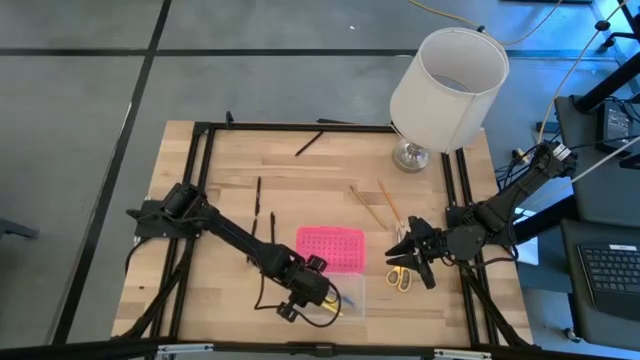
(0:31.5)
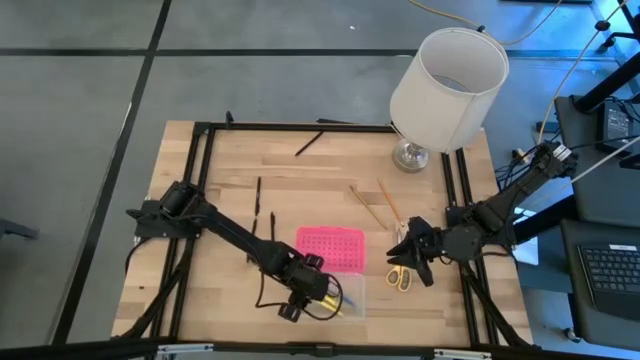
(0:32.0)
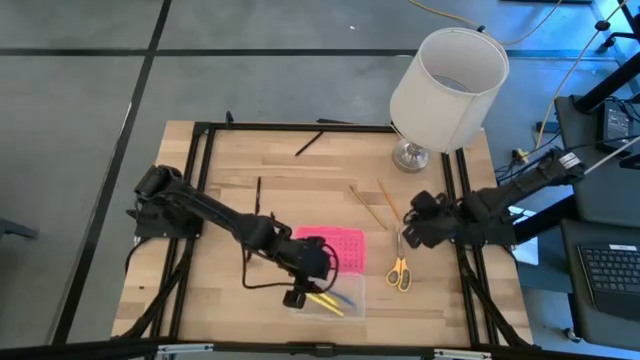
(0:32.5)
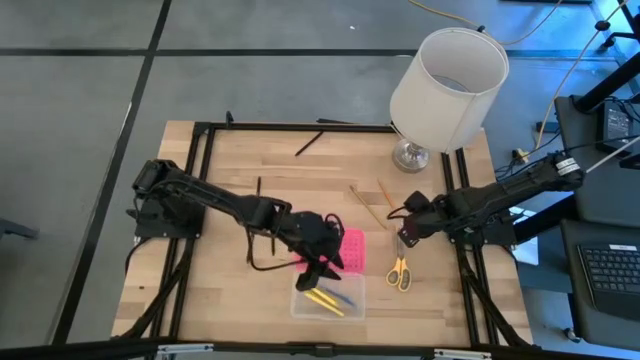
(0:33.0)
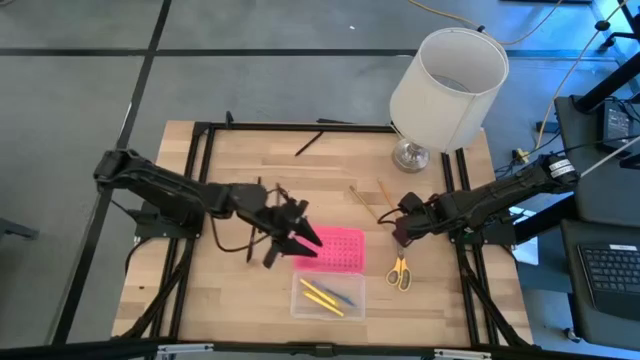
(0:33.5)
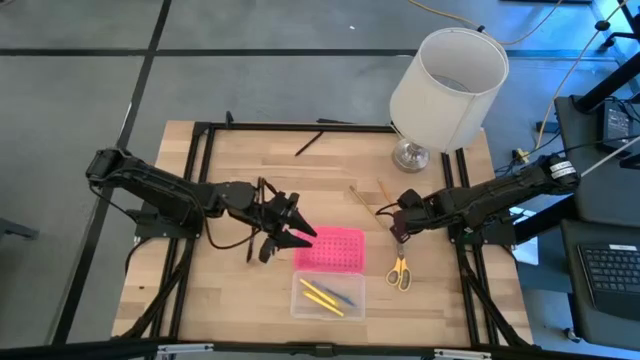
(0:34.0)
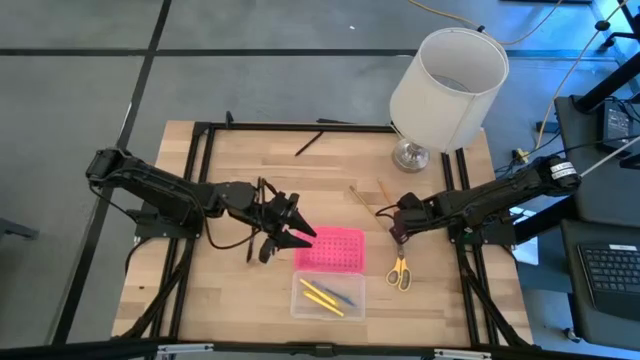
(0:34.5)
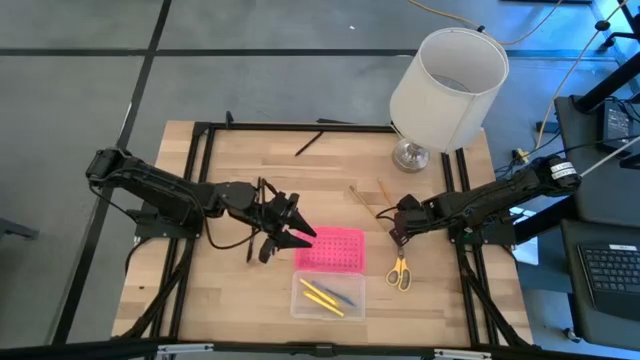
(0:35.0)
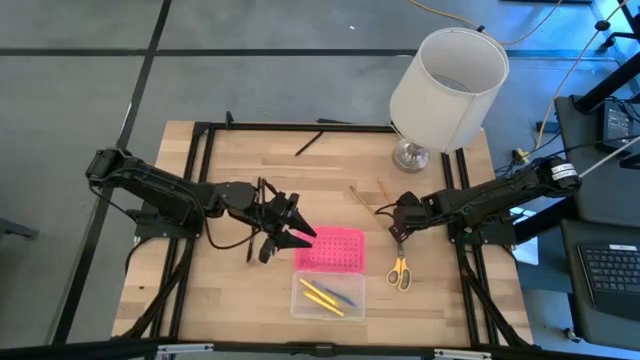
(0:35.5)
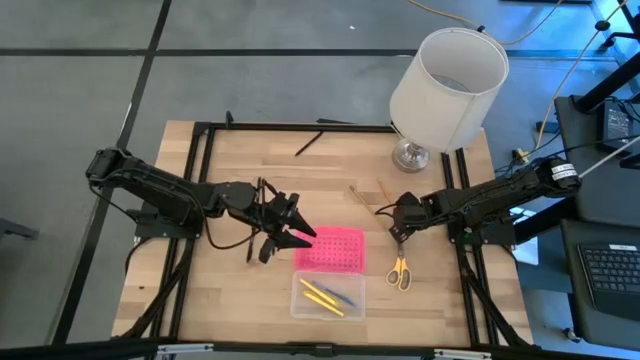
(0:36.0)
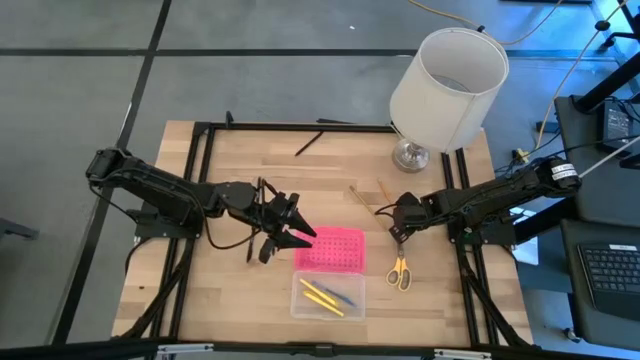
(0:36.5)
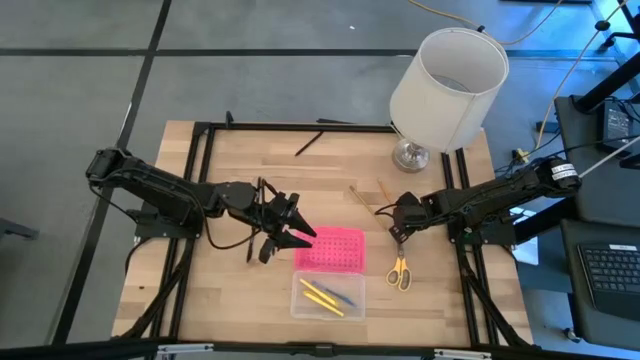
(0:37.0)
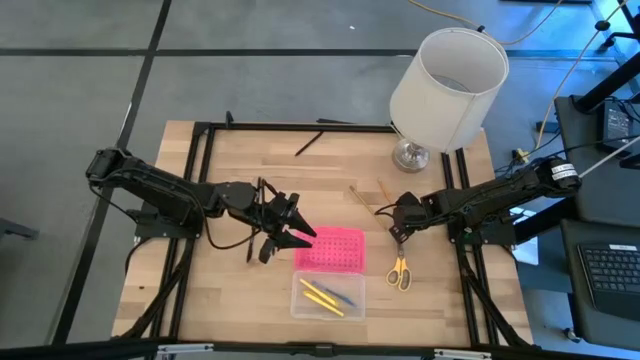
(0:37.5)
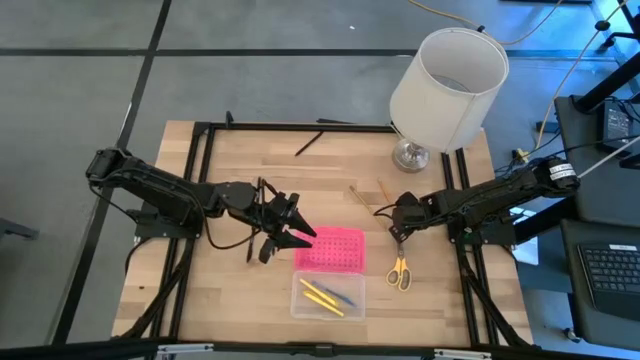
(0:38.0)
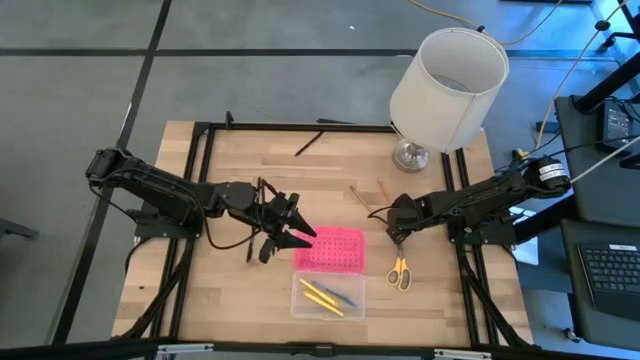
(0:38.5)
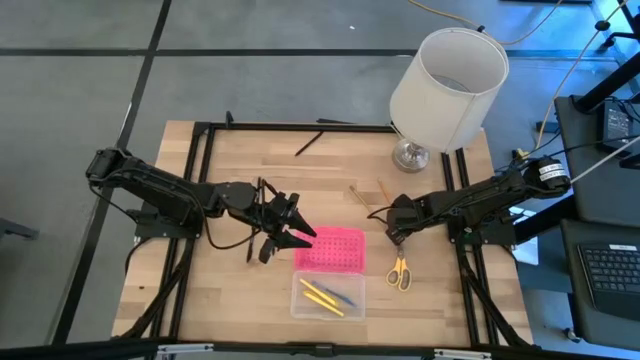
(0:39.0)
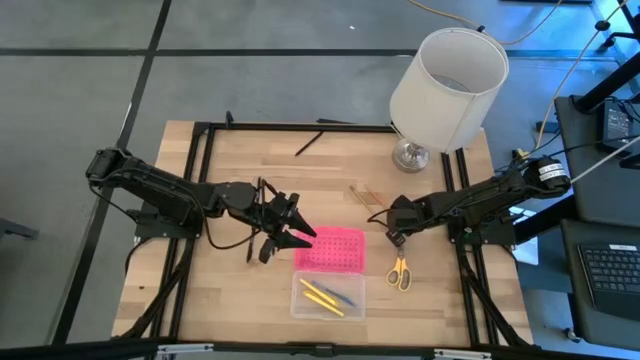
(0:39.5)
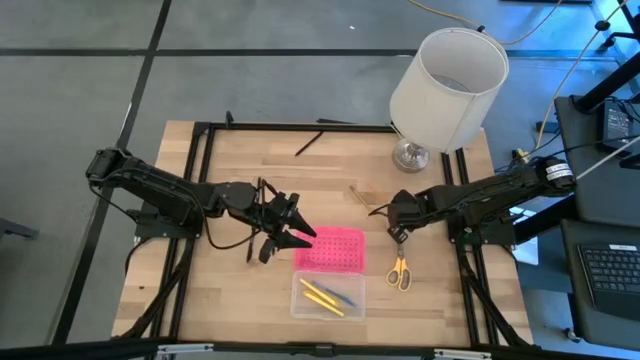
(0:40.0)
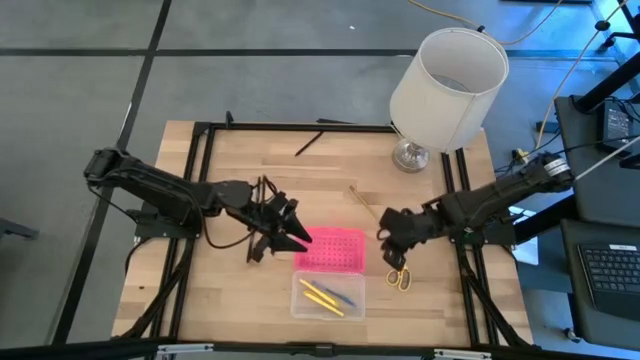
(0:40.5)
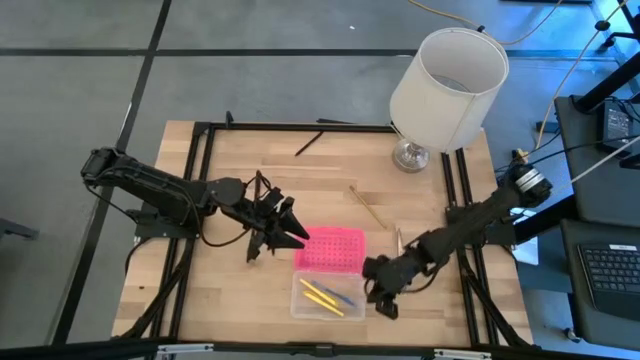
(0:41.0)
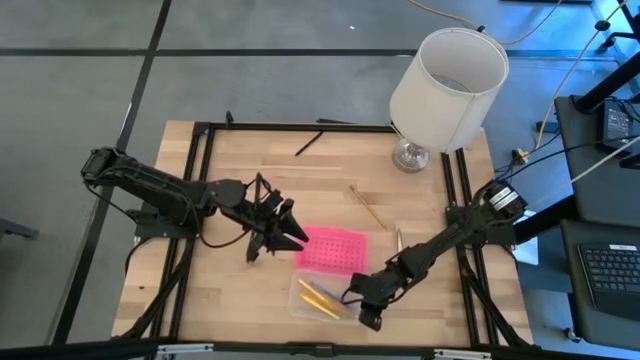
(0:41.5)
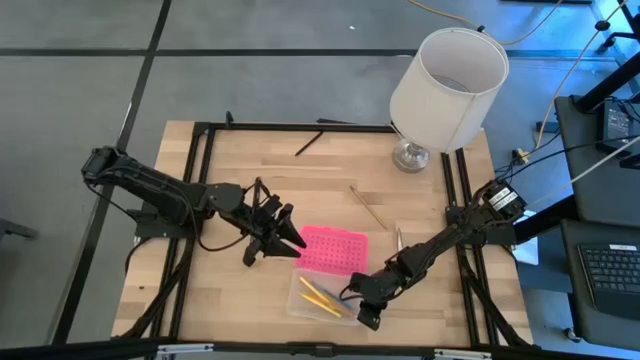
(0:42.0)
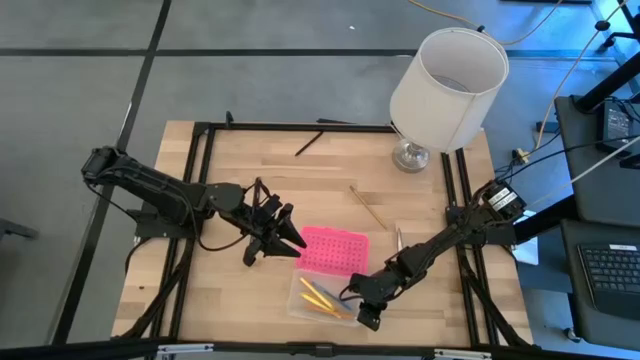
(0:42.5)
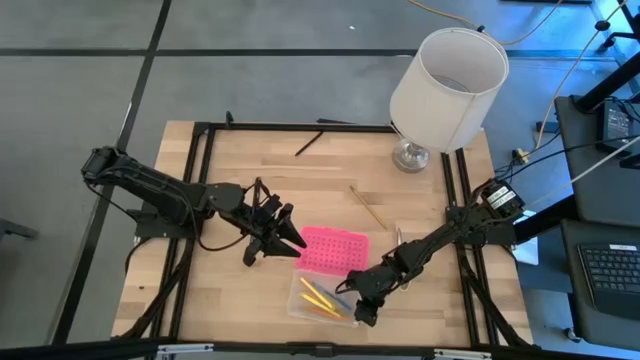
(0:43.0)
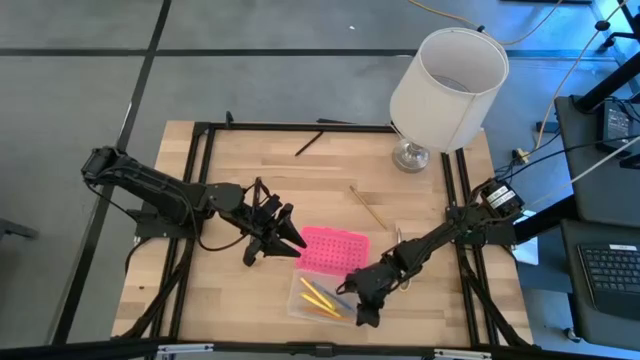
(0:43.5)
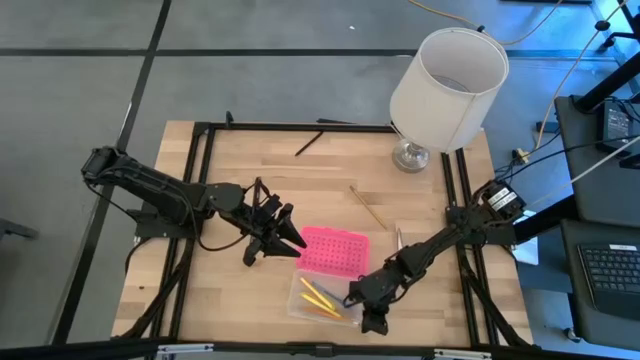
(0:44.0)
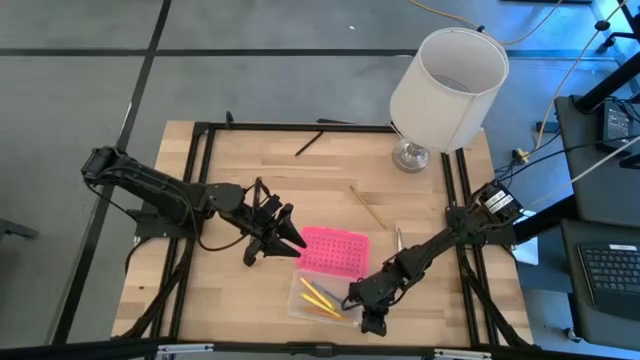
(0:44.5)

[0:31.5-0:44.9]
Task: Pick & place school supplies into a supply box
Put the orange pencil into the pink supply box

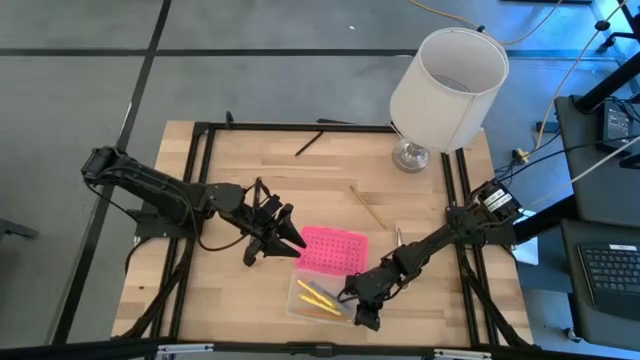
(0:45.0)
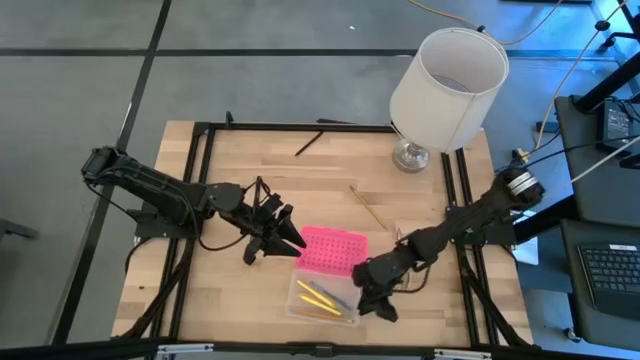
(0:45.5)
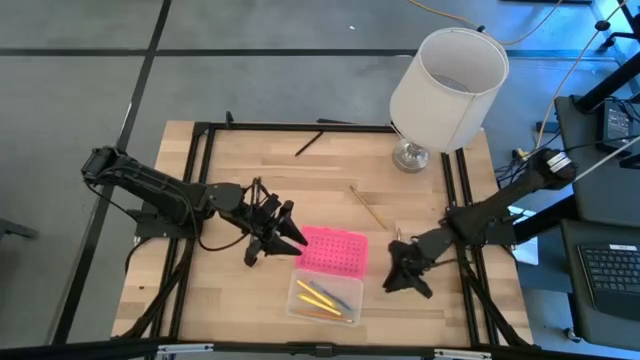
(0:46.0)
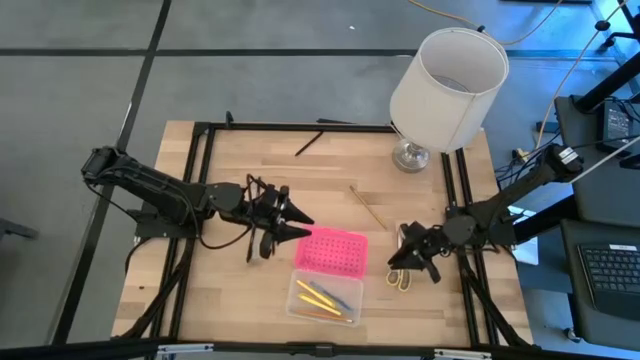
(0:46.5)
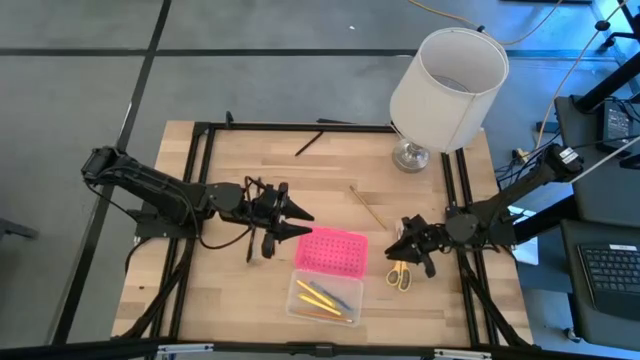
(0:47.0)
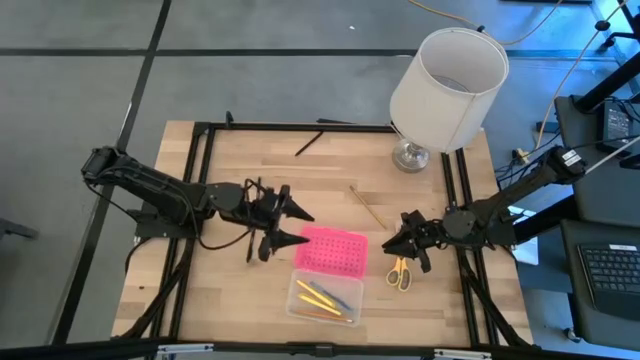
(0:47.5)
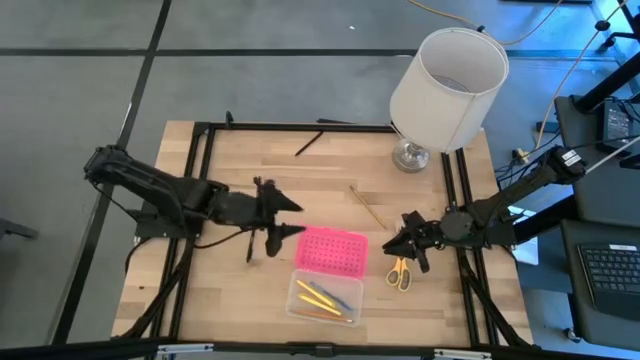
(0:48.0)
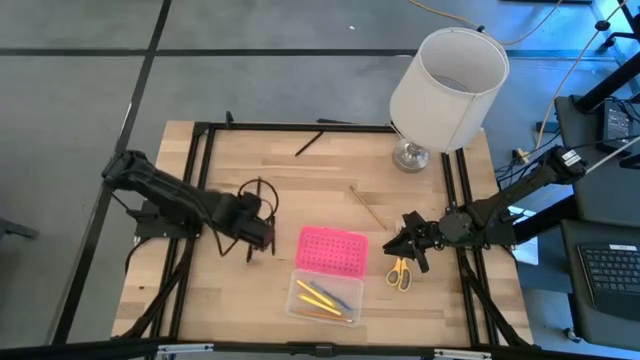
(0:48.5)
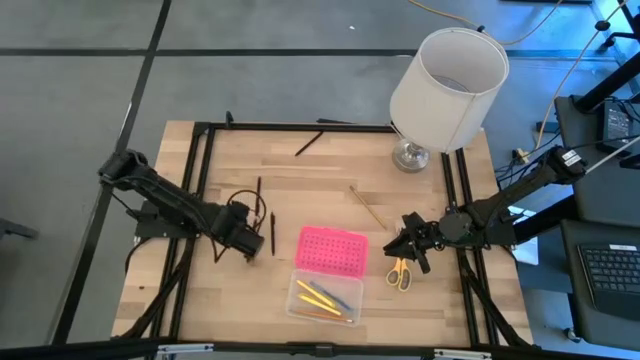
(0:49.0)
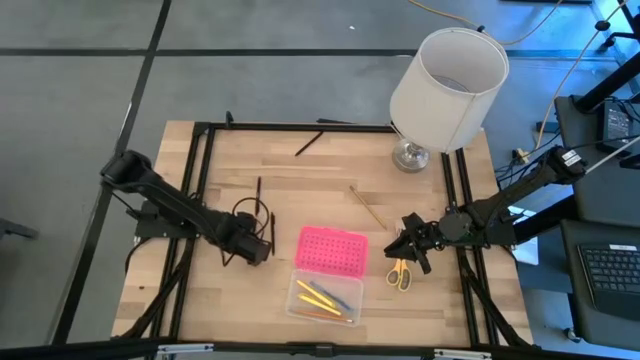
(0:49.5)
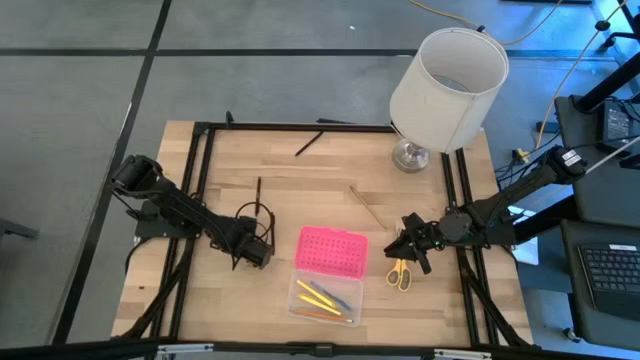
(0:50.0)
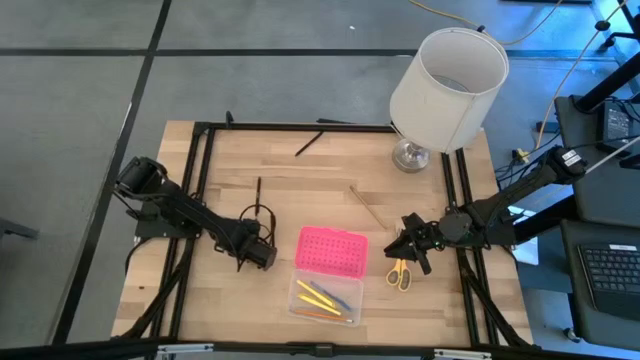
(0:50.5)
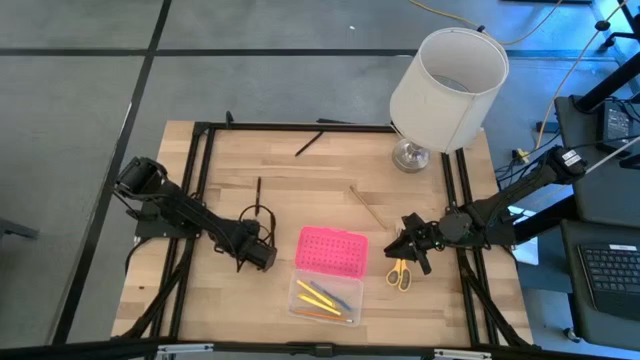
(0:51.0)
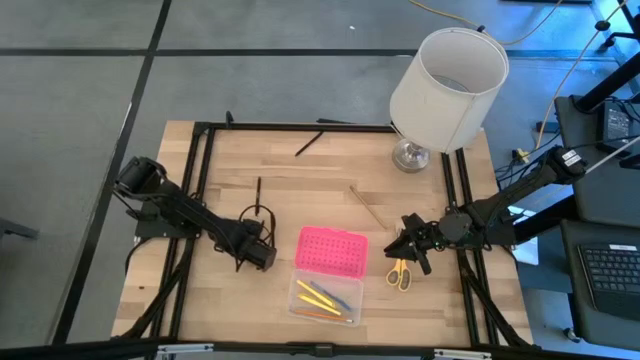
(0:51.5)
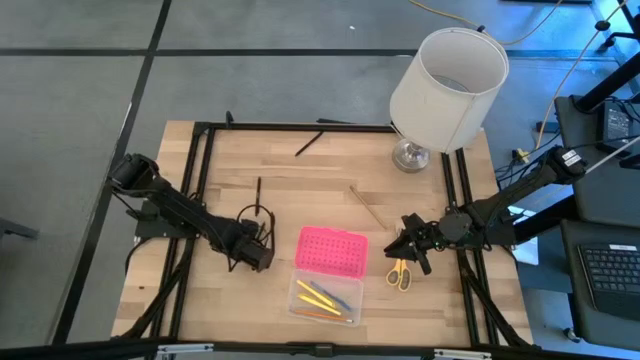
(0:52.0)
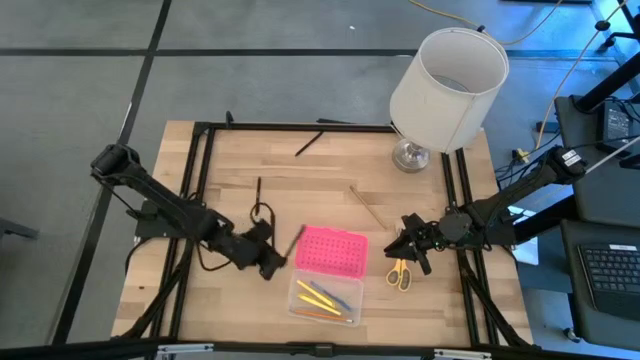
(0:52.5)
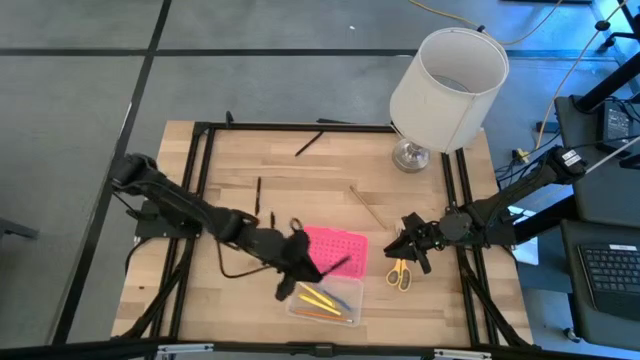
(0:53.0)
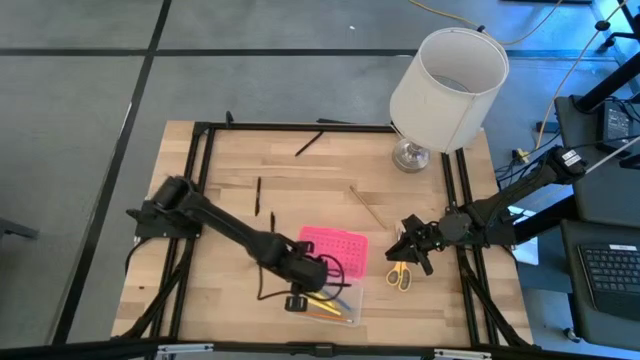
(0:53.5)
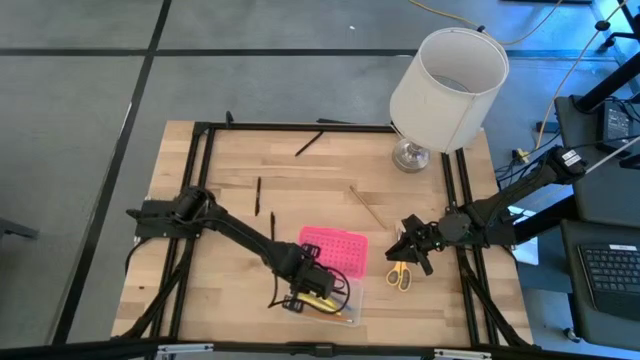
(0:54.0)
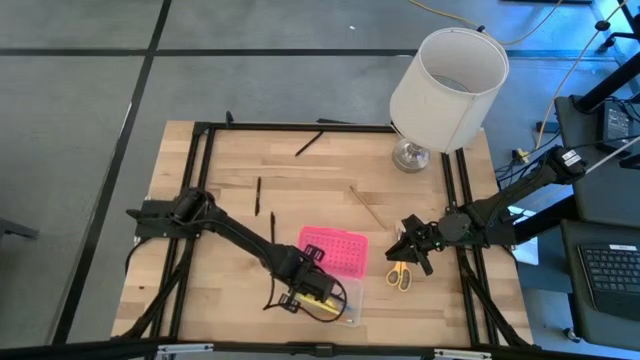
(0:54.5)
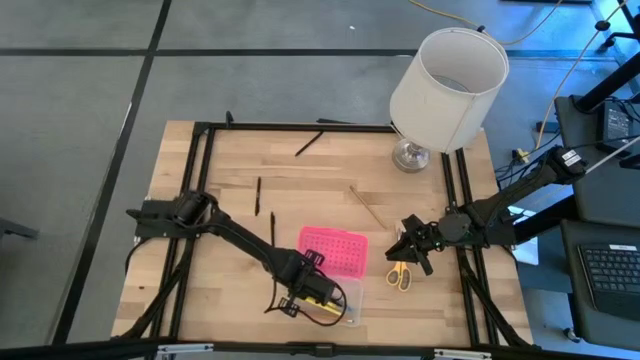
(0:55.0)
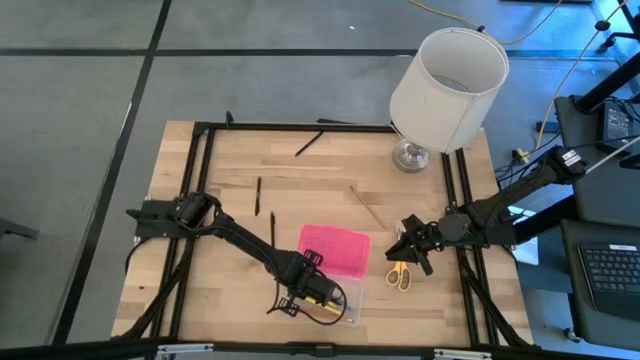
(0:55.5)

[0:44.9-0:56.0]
Put the black pen into the pink supply box
